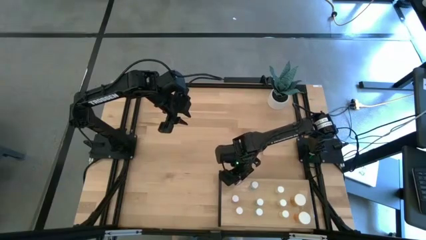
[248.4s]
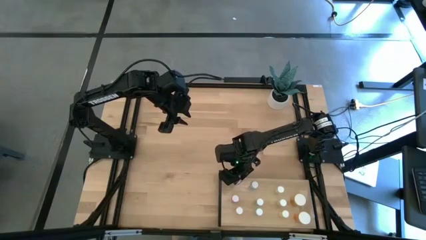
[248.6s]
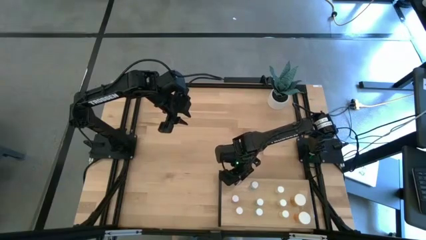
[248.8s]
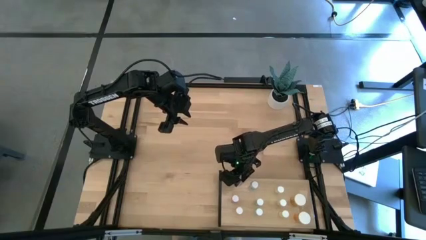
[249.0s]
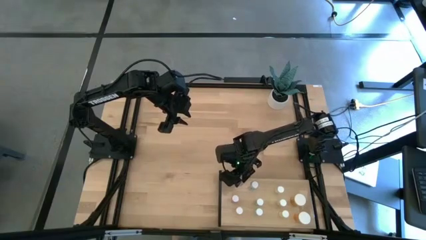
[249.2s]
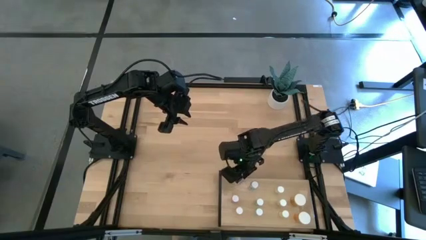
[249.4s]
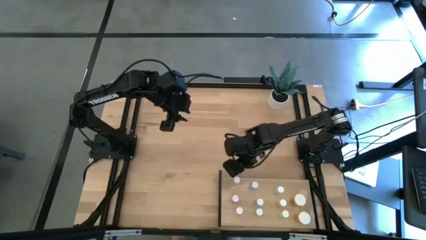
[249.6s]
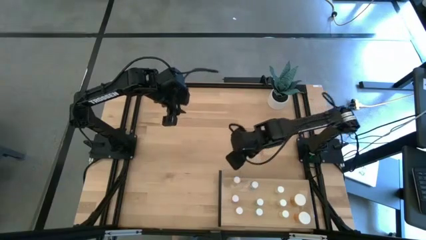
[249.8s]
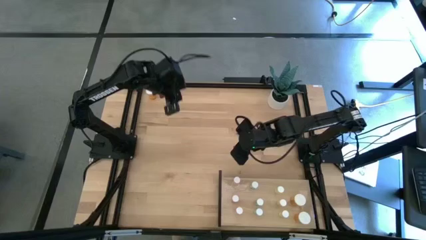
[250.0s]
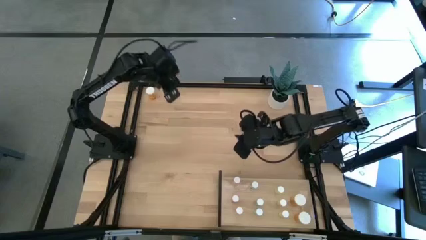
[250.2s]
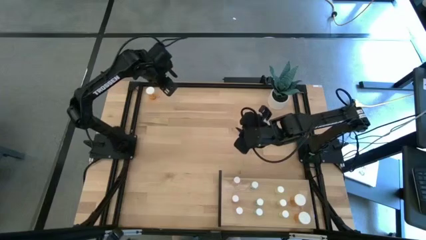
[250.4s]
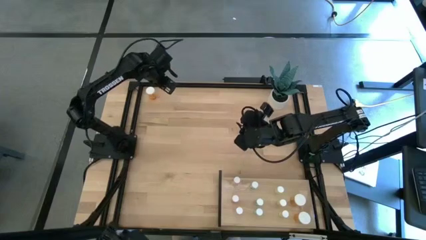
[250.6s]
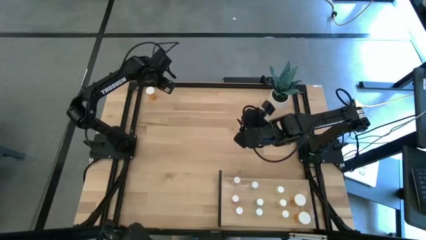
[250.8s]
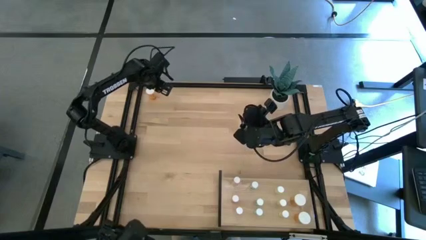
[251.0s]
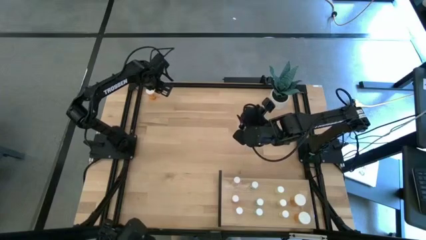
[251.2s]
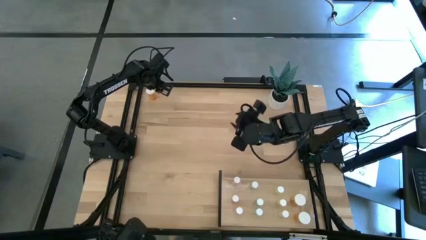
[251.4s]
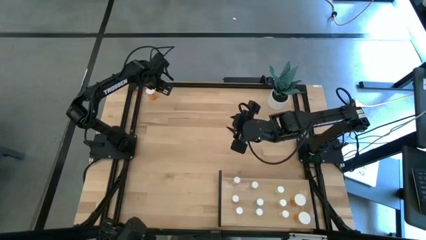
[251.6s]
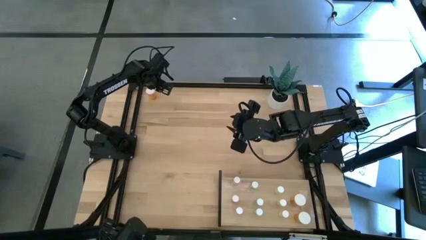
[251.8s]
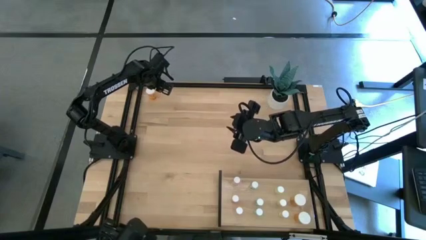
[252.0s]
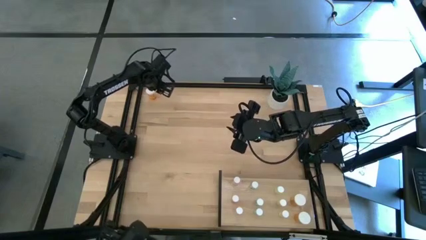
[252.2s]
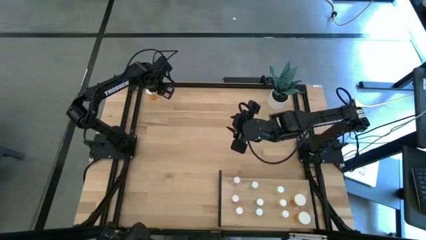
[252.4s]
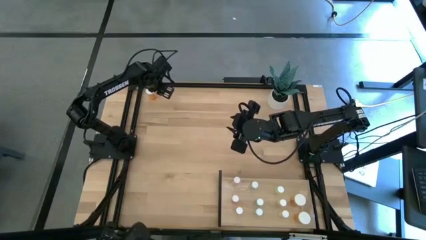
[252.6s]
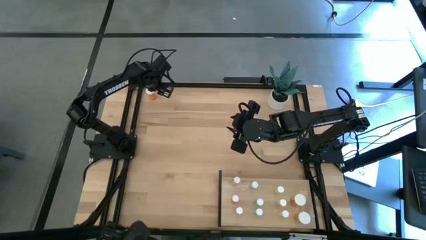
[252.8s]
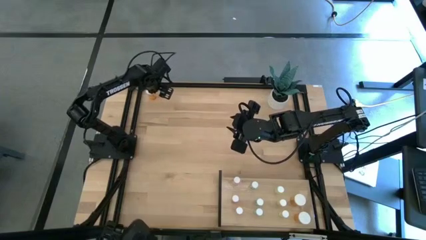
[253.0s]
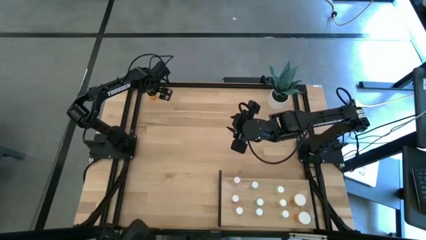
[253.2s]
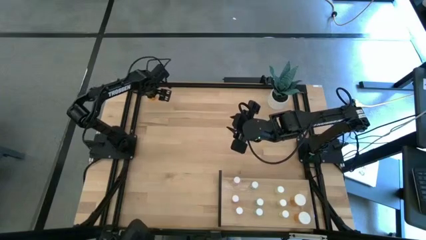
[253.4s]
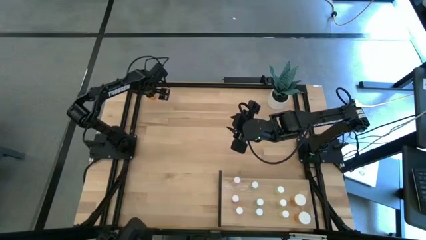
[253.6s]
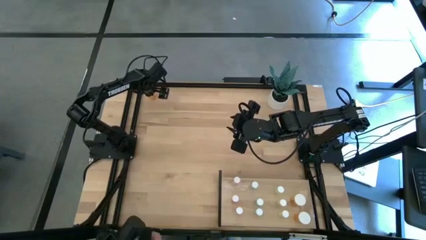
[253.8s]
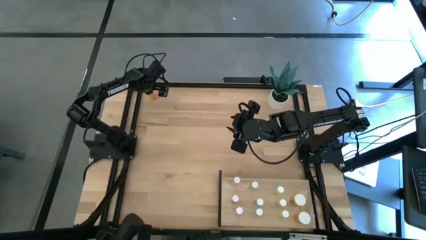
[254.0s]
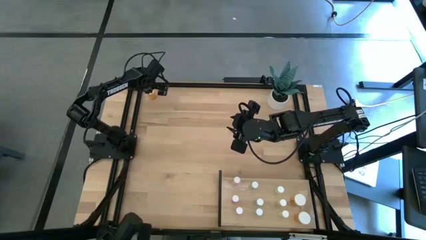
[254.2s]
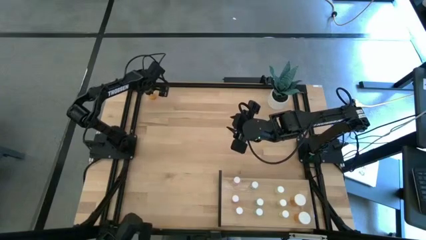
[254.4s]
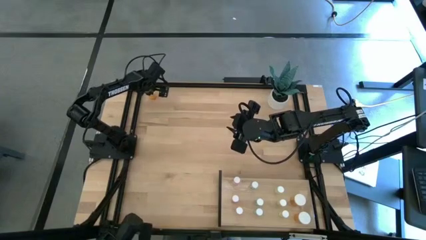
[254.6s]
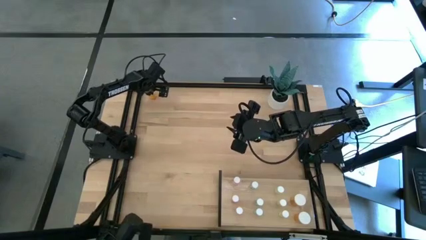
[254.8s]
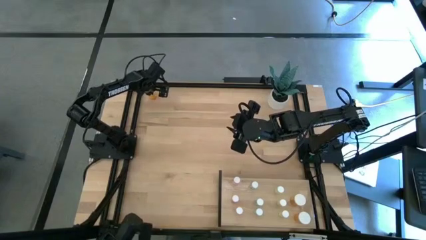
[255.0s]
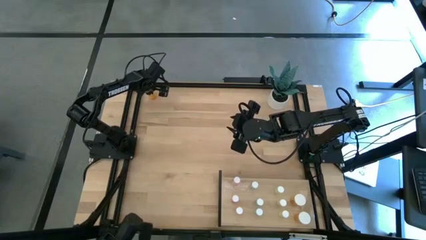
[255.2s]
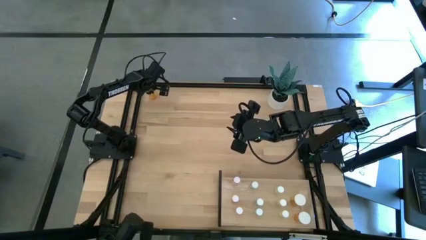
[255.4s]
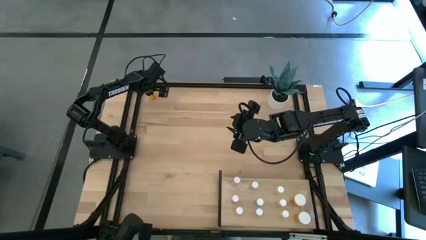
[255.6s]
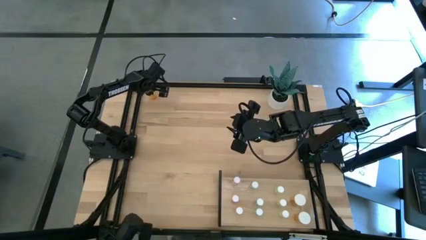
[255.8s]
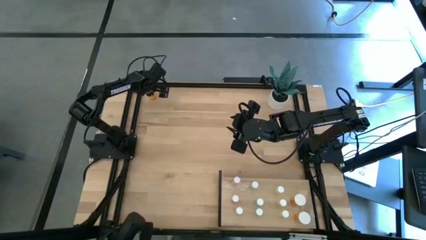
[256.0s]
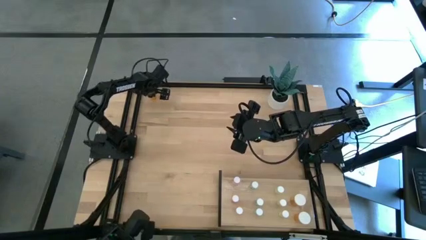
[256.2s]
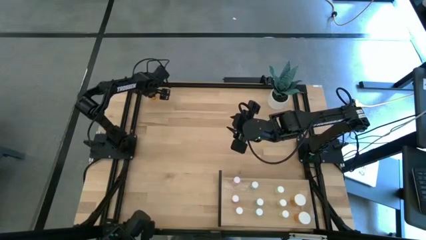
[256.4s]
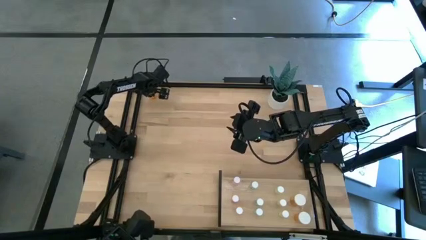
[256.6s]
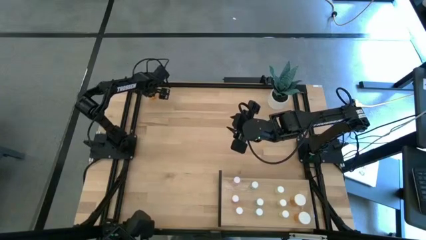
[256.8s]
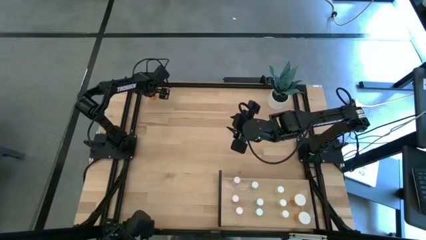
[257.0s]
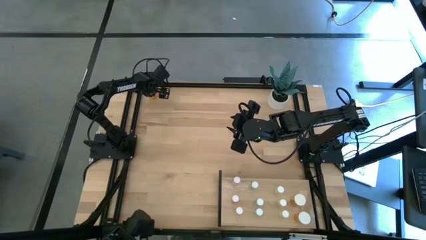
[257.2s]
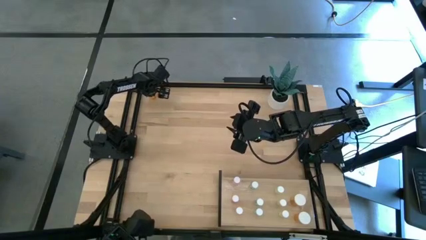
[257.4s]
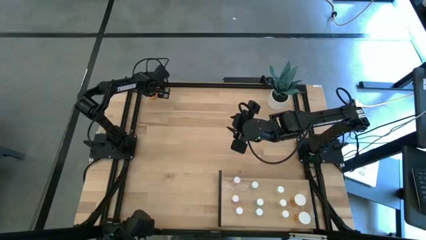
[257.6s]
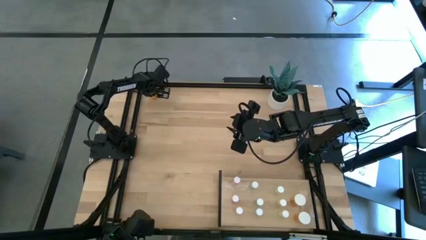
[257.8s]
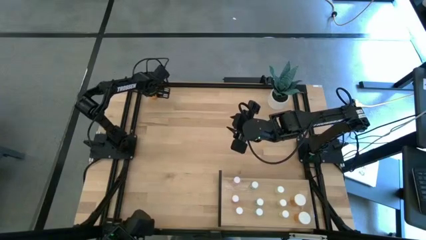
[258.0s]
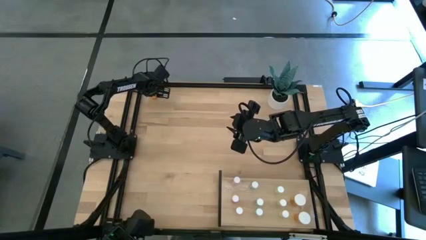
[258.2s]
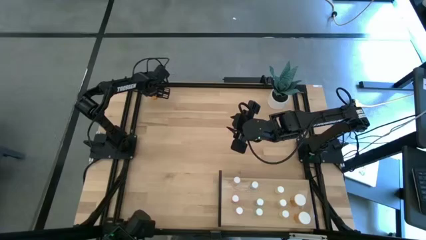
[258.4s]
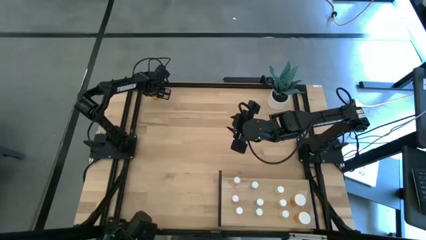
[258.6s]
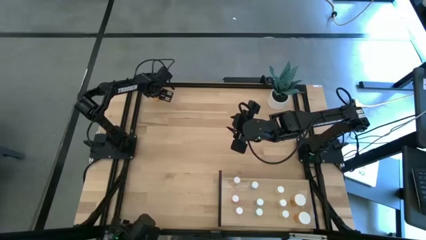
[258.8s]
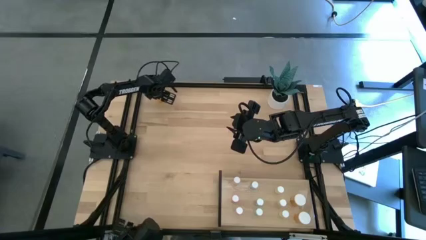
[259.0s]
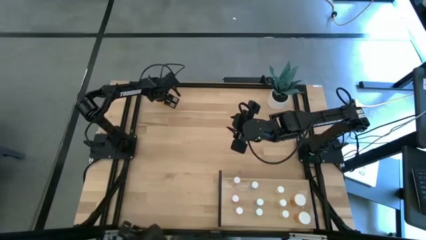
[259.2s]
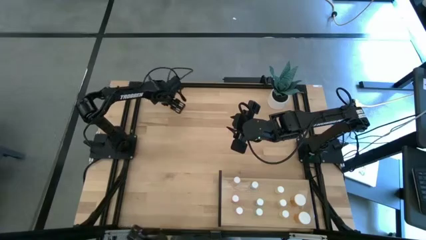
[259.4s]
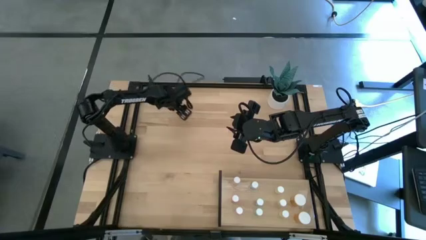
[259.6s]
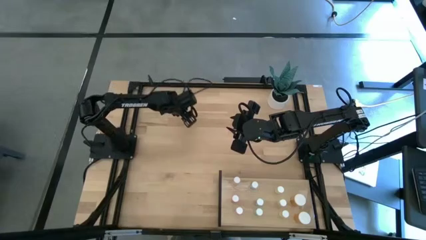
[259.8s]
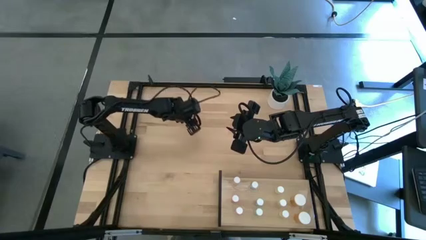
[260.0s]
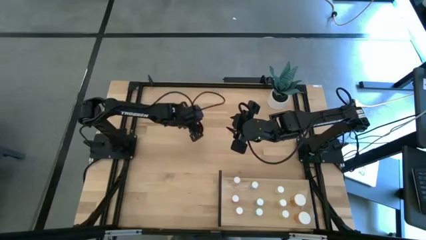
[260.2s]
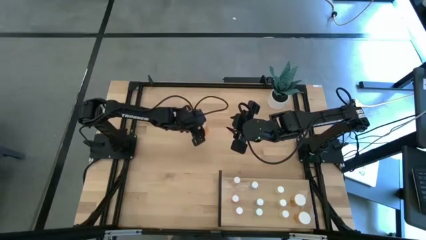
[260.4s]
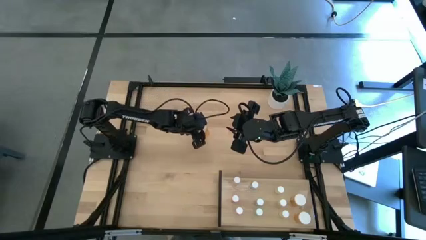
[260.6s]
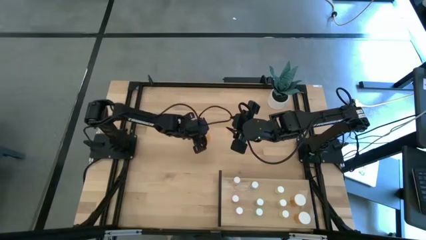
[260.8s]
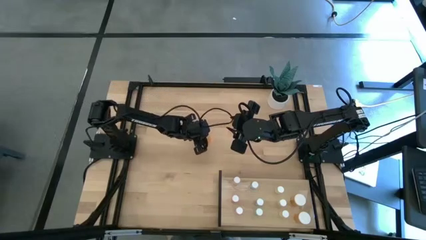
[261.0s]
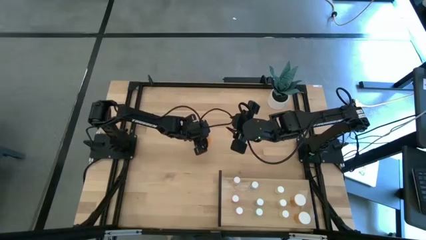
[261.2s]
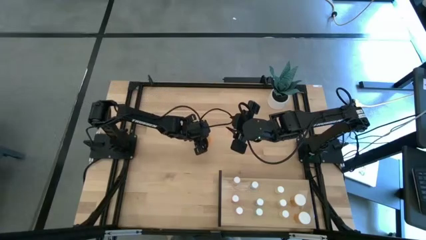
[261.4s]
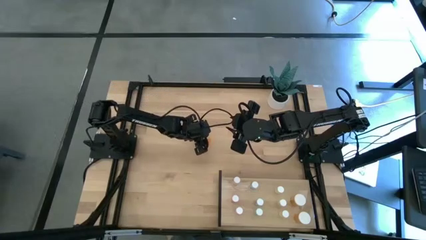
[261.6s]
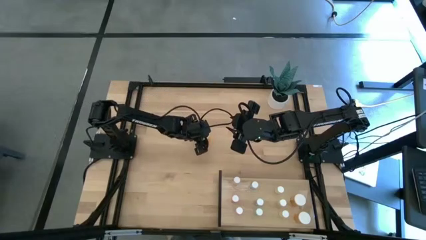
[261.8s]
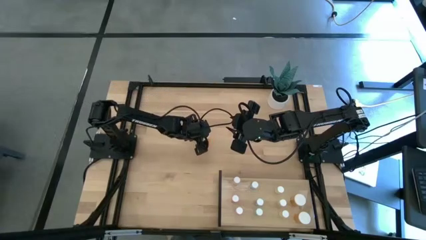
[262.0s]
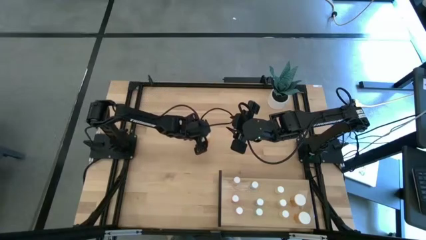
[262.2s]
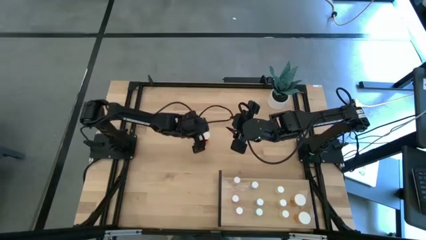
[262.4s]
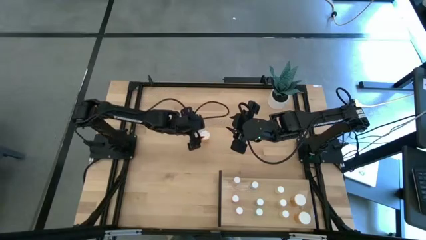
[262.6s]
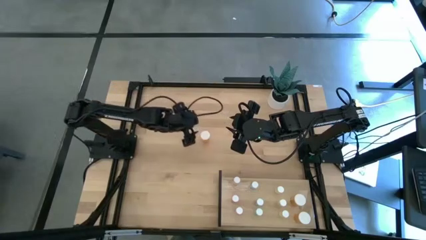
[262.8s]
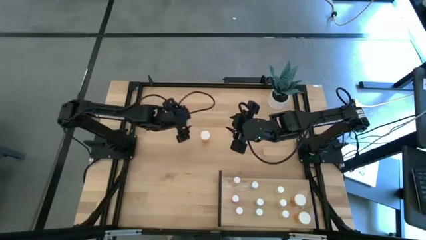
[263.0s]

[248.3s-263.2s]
Task: Pick and place medicine bottles onto shelf by color
Put the orange pill bottle on the shelf aligned with the other orange pill bottle

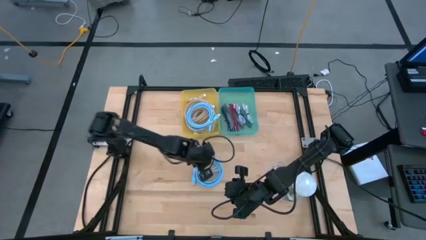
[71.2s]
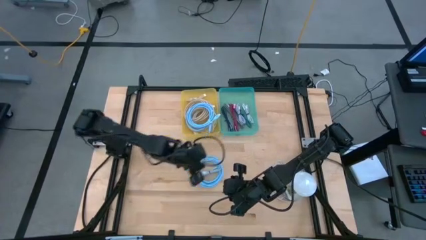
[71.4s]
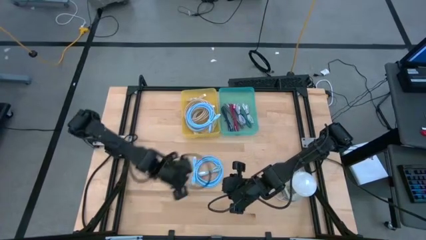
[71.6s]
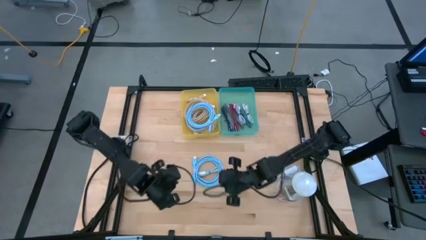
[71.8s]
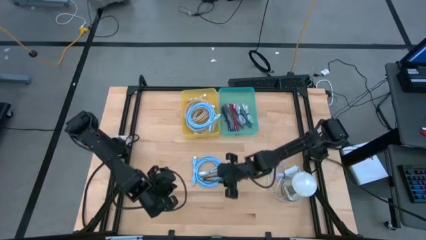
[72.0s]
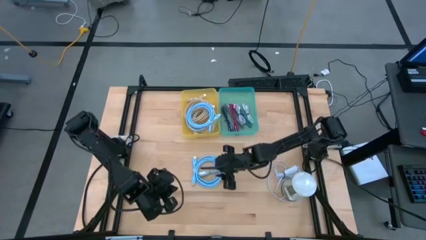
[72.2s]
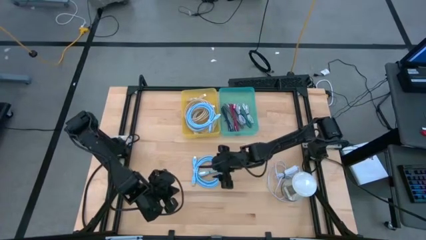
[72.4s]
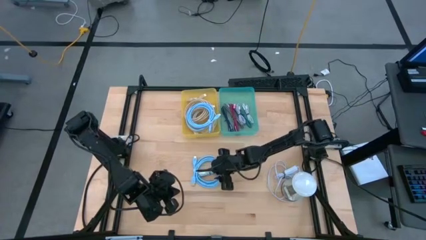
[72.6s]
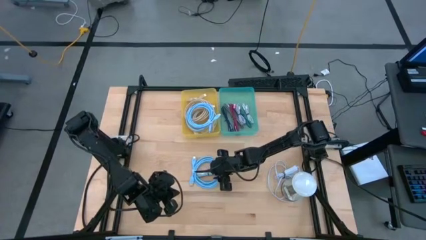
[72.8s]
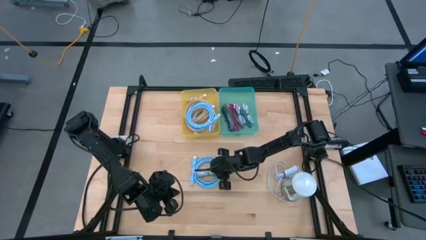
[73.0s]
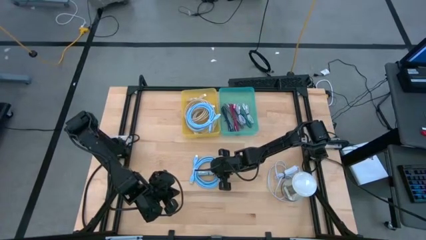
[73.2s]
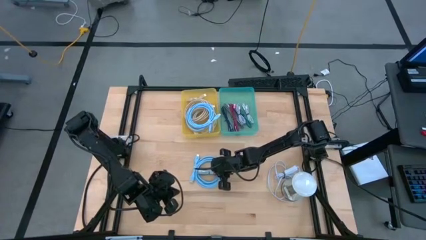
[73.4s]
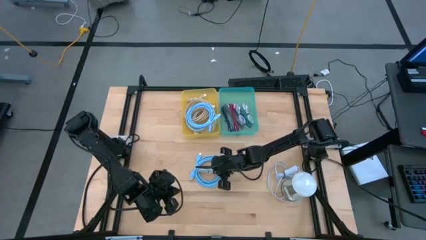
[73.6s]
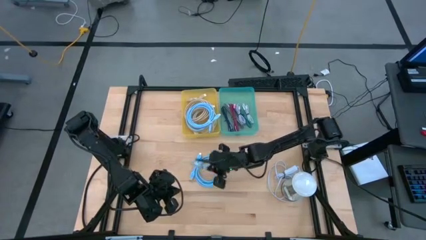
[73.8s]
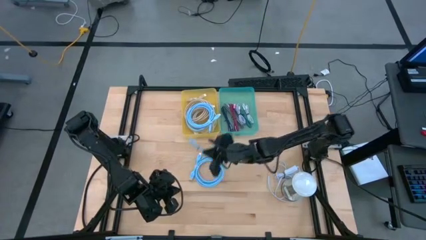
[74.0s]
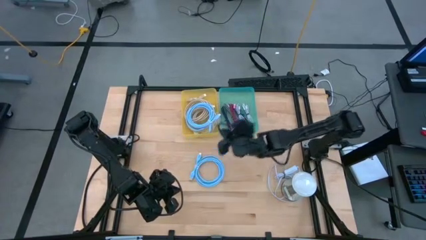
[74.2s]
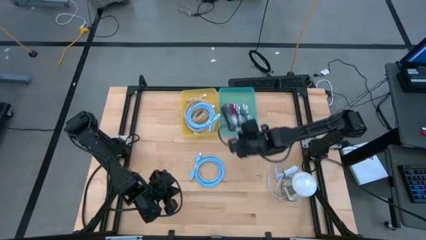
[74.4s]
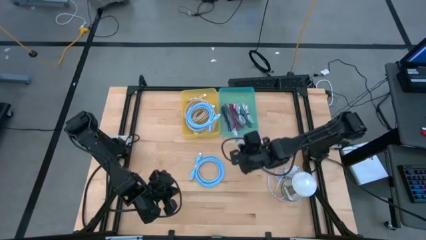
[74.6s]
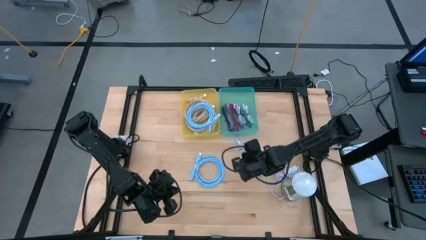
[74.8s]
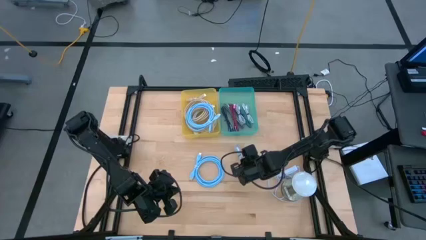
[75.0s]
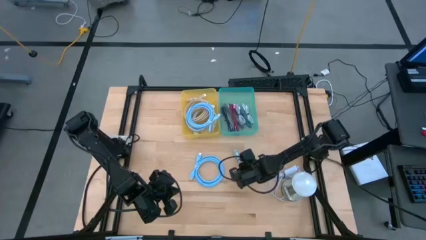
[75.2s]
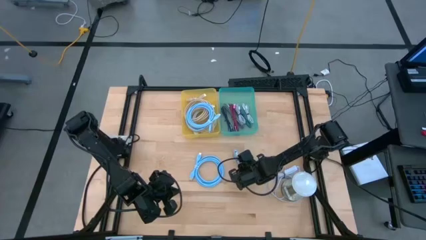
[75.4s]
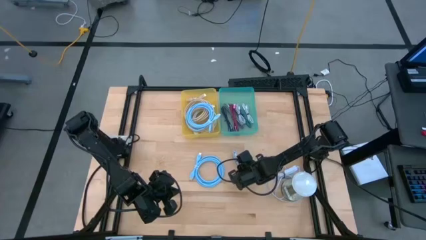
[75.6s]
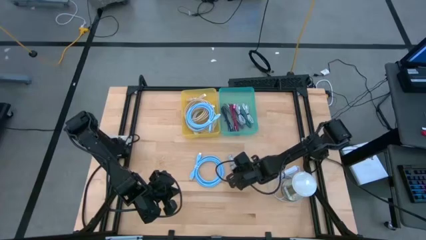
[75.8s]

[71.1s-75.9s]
Task: Pick and place USB-C Cables
Move the small light blue charger cable to the center of the table
